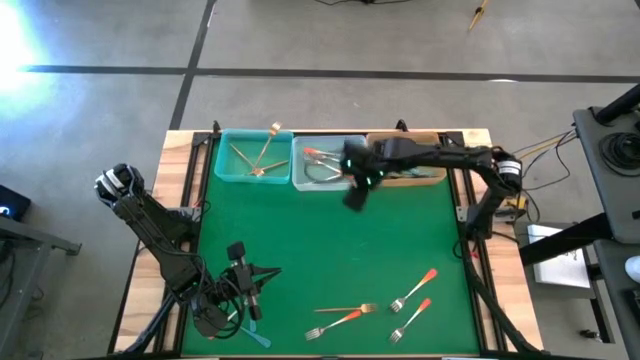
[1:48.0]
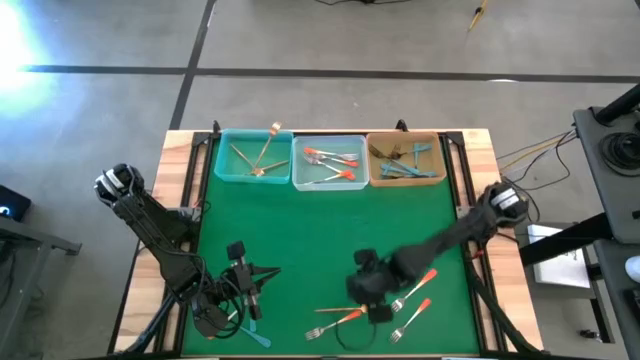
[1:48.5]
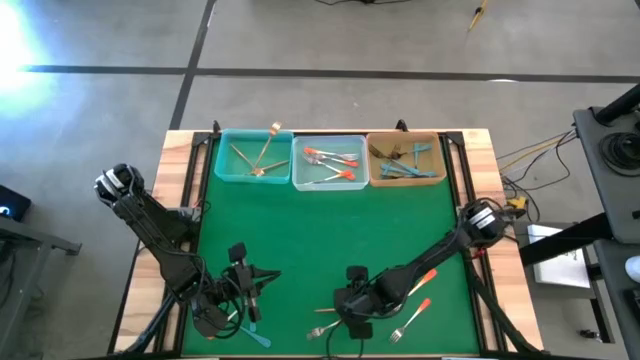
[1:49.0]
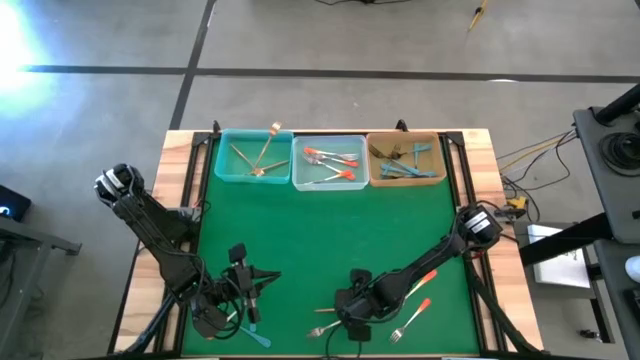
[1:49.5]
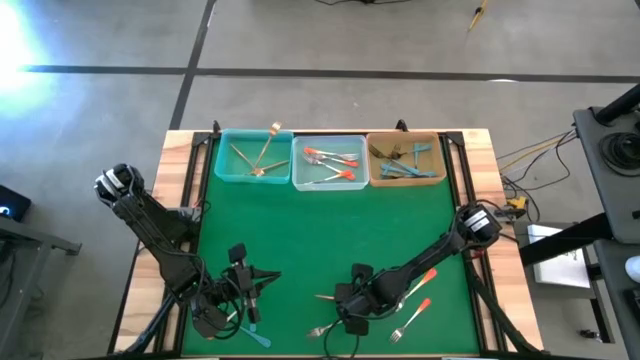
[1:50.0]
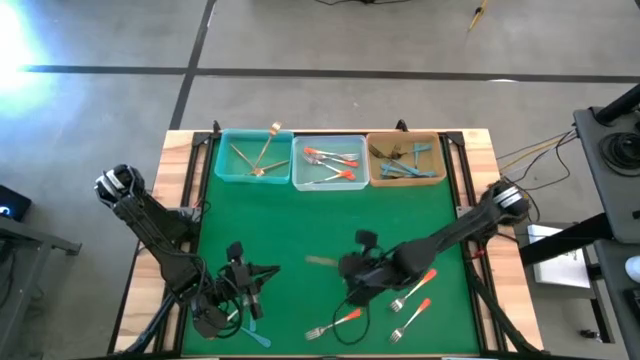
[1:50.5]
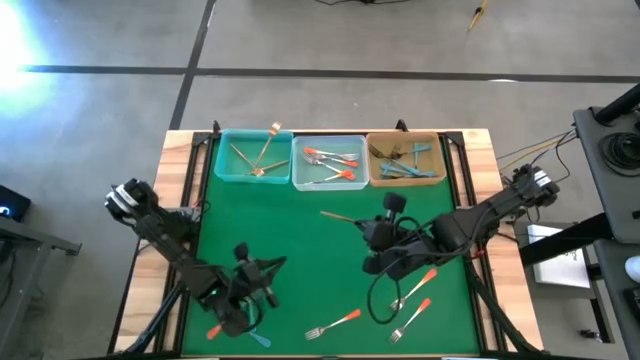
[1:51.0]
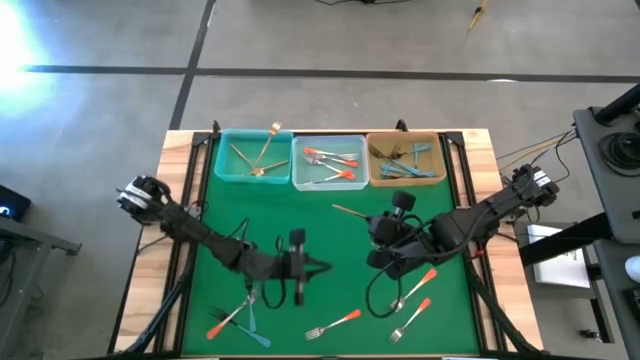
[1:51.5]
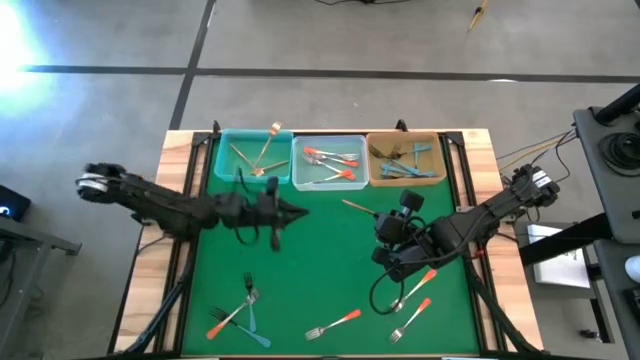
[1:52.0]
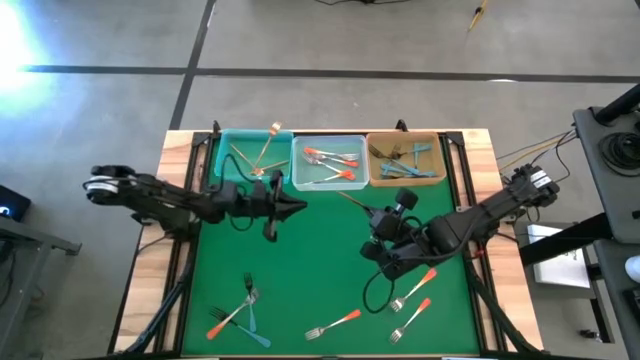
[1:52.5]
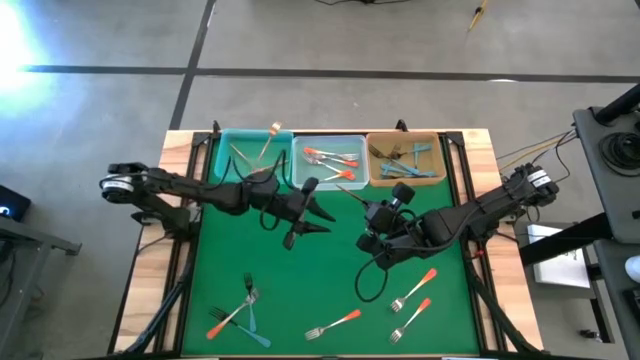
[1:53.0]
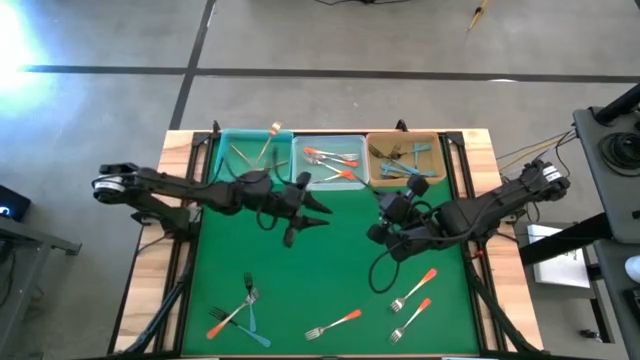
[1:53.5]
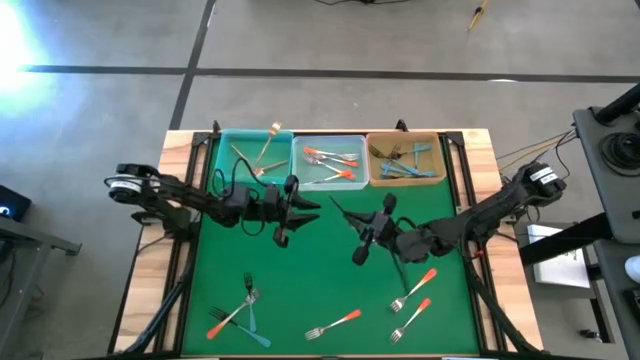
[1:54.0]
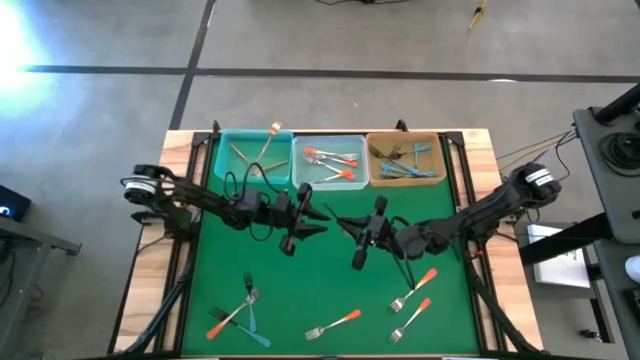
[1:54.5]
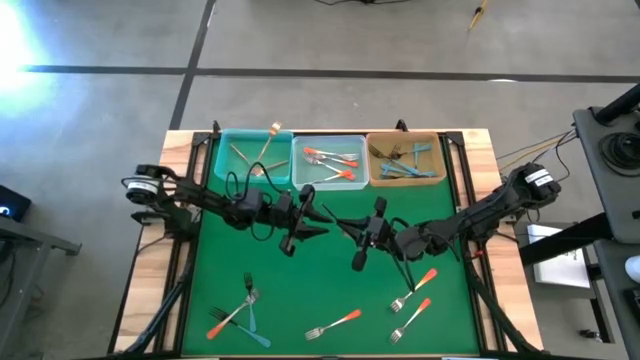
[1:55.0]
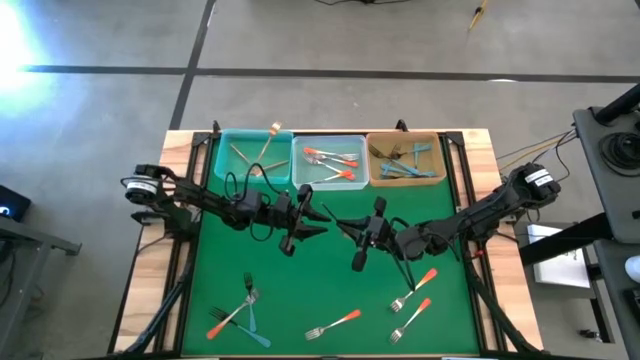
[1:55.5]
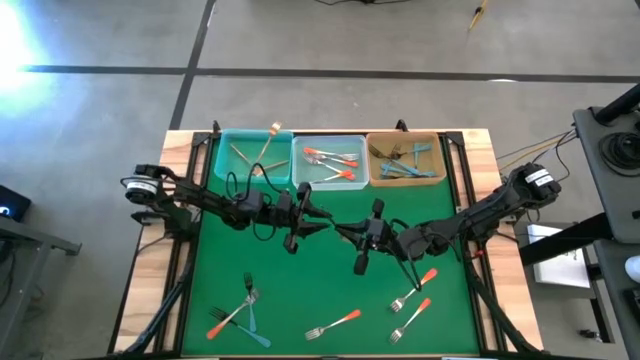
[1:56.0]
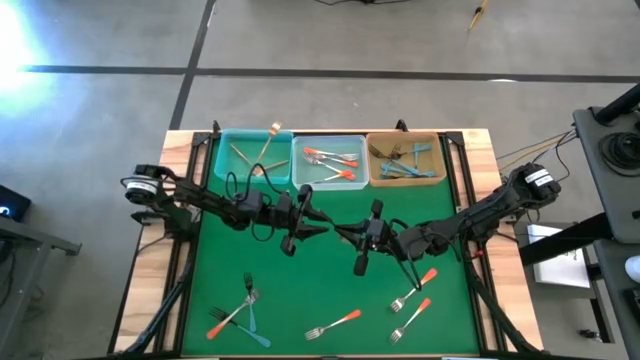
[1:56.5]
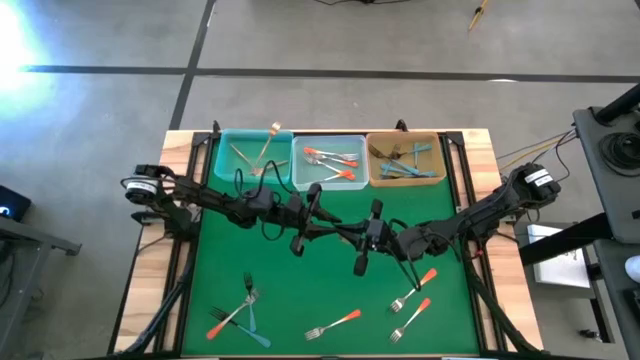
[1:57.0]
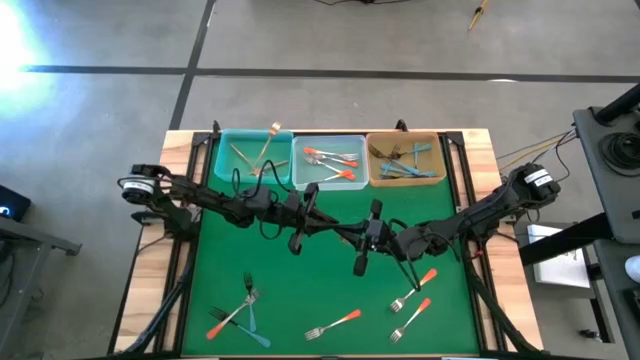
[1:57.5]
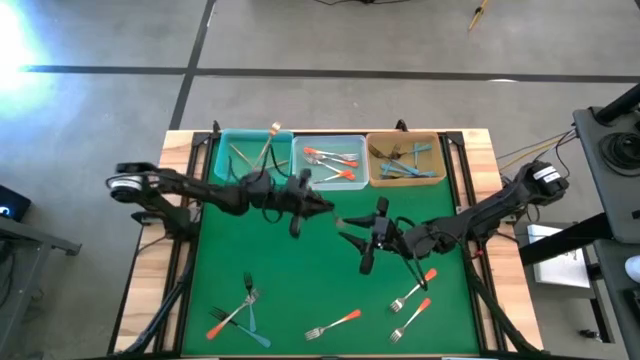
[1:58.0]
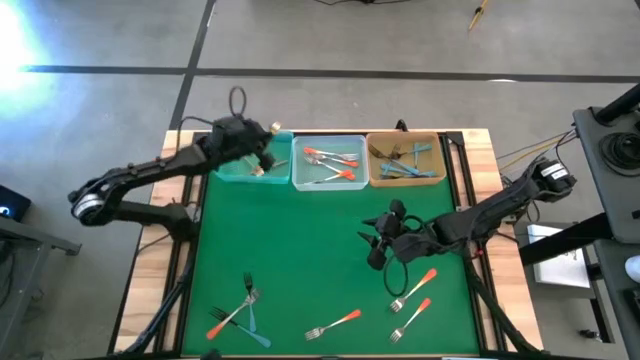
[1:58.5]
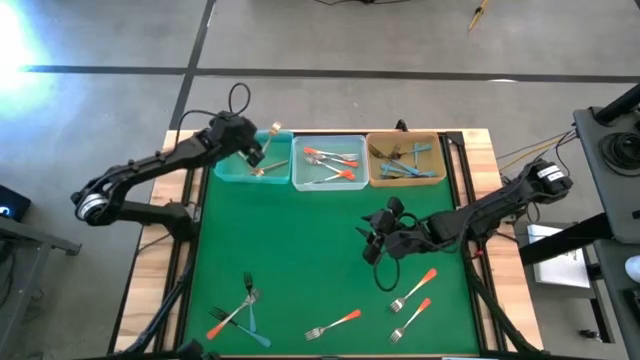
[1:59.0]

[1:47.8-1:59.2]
Task: Sort silverware by color (type)
Put the gold fork into the blue bin

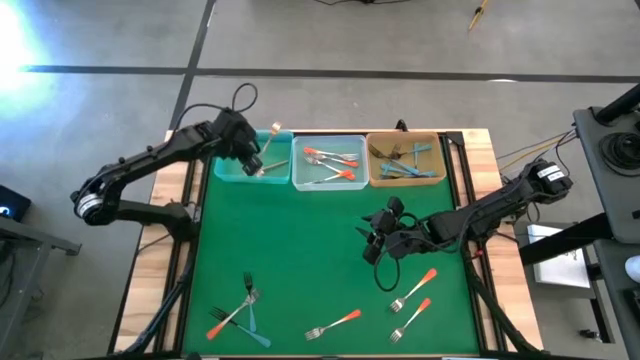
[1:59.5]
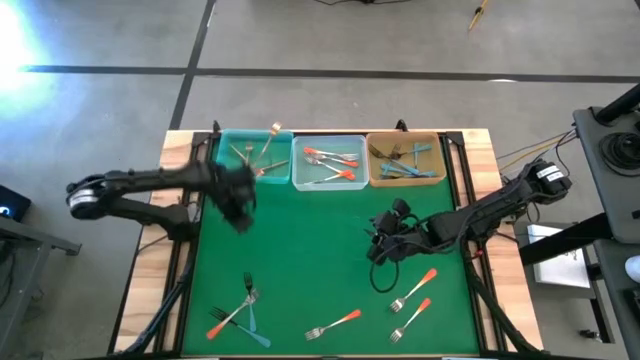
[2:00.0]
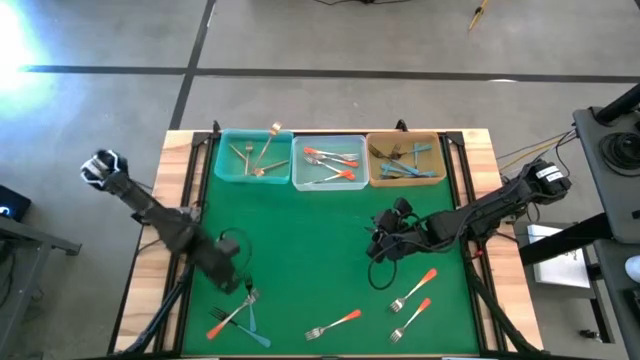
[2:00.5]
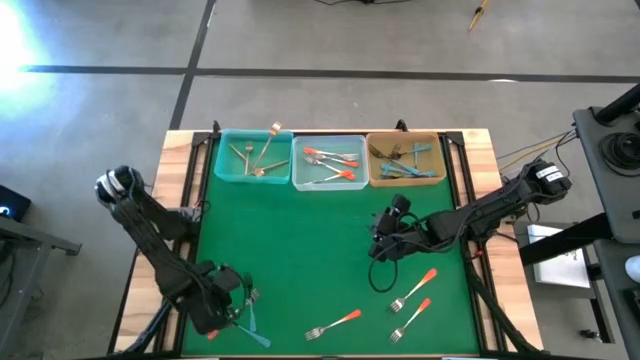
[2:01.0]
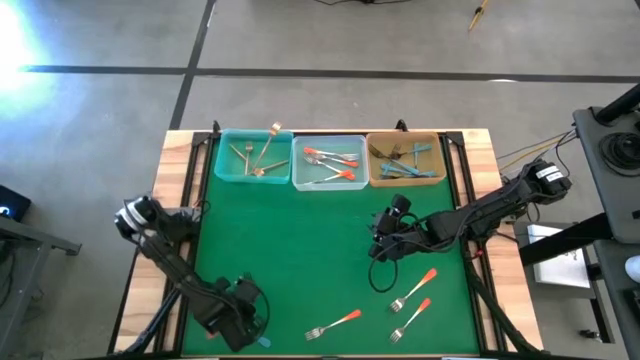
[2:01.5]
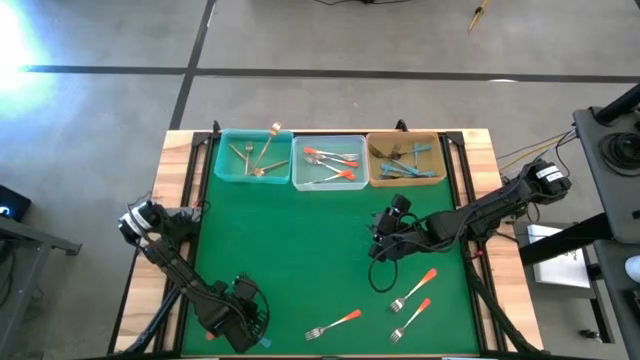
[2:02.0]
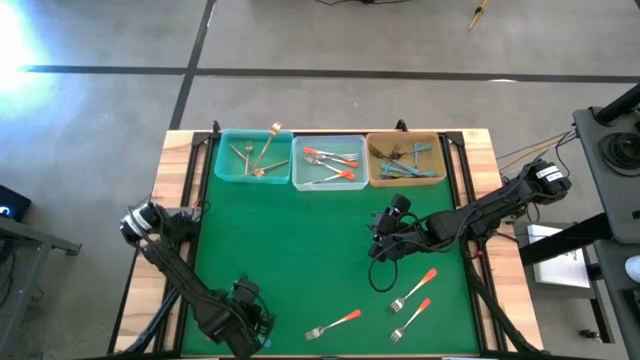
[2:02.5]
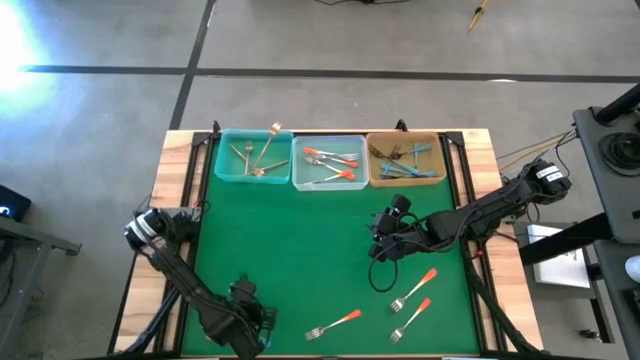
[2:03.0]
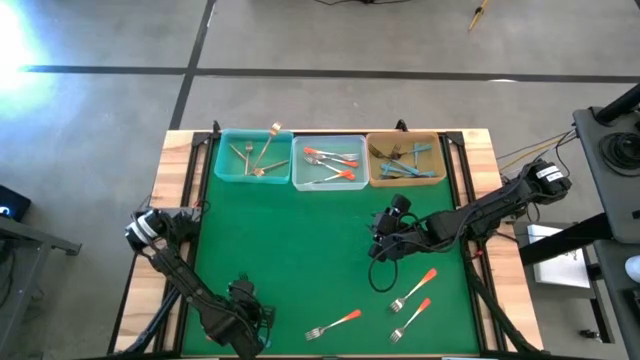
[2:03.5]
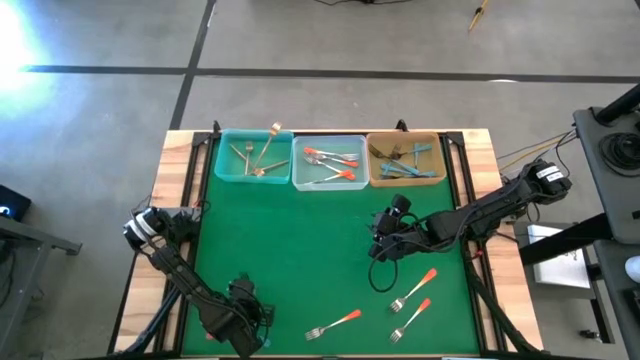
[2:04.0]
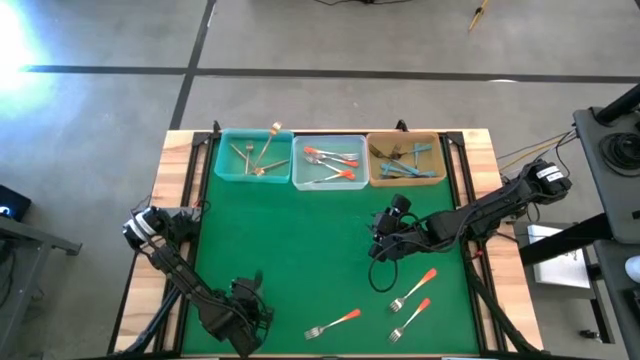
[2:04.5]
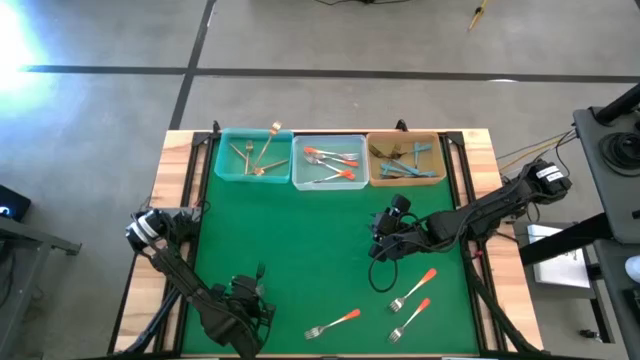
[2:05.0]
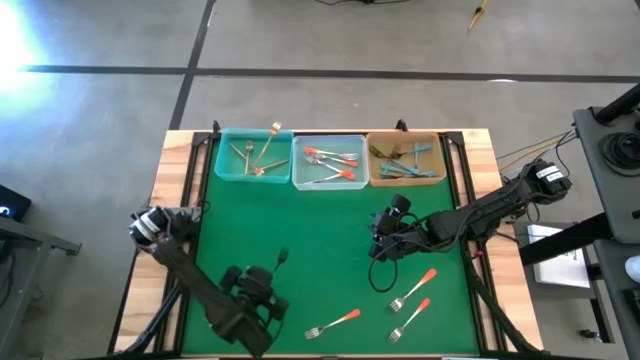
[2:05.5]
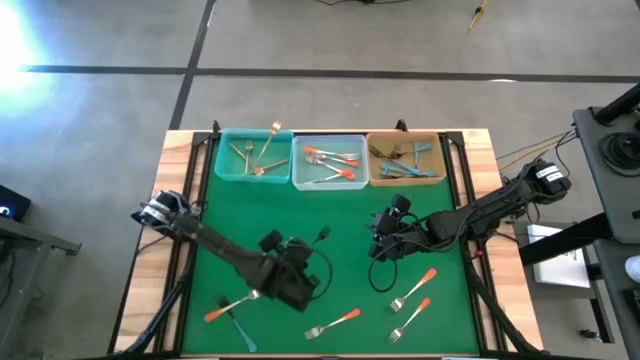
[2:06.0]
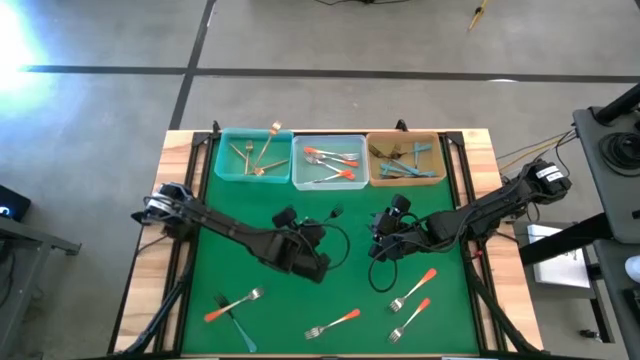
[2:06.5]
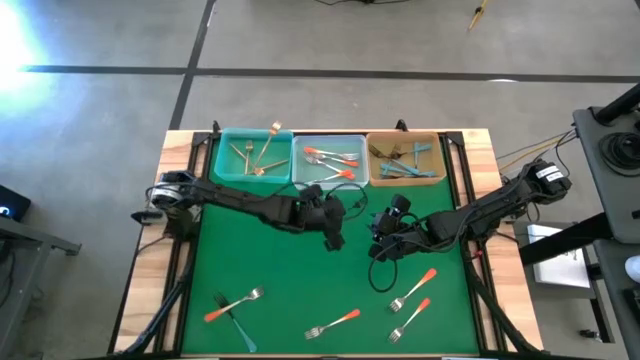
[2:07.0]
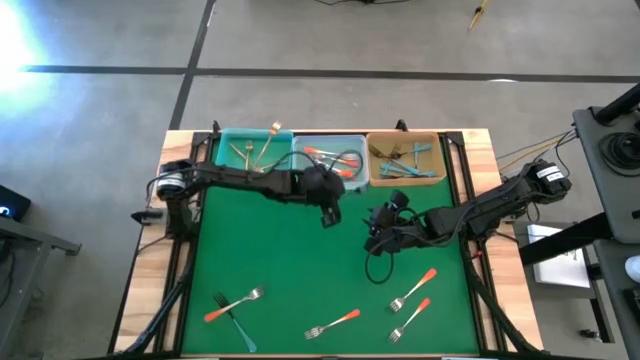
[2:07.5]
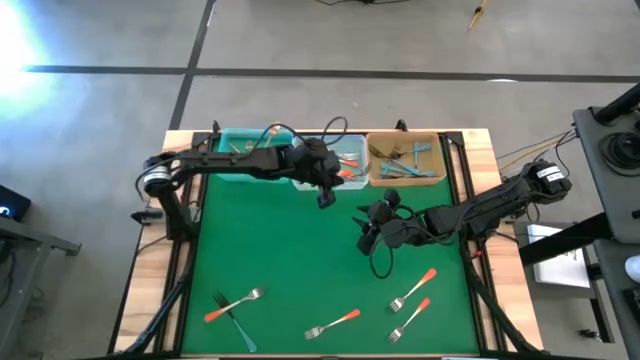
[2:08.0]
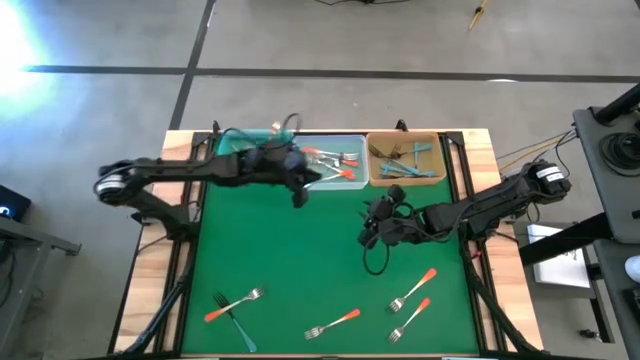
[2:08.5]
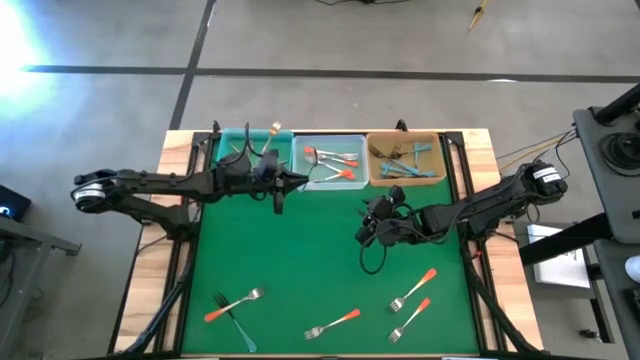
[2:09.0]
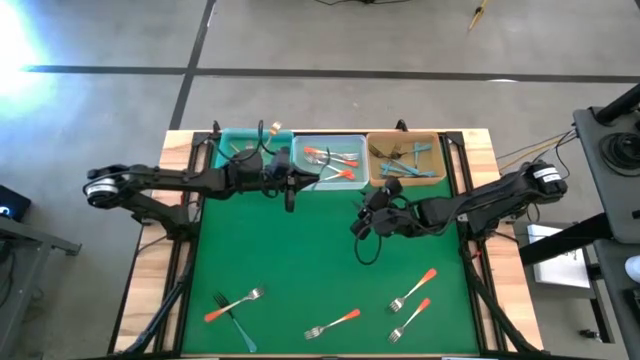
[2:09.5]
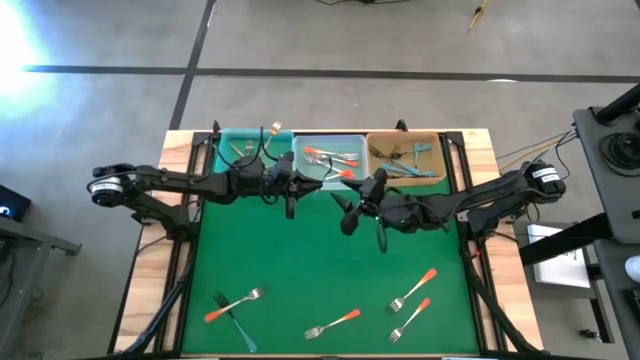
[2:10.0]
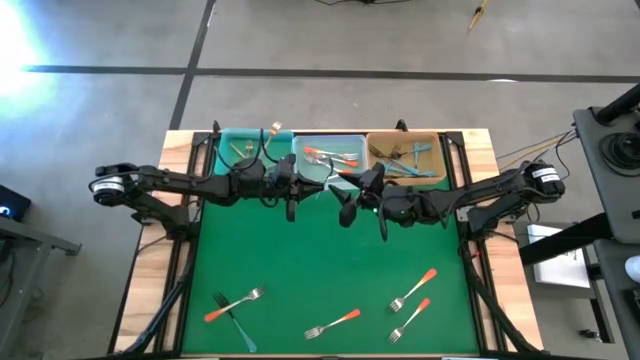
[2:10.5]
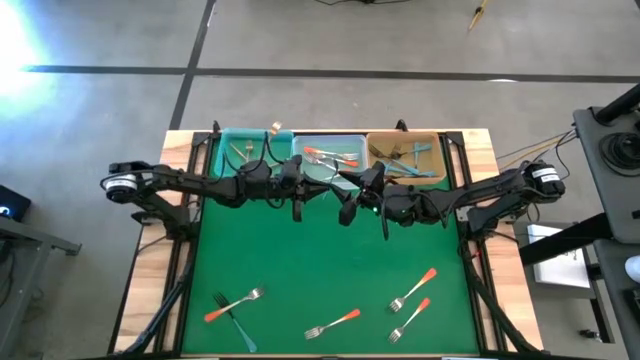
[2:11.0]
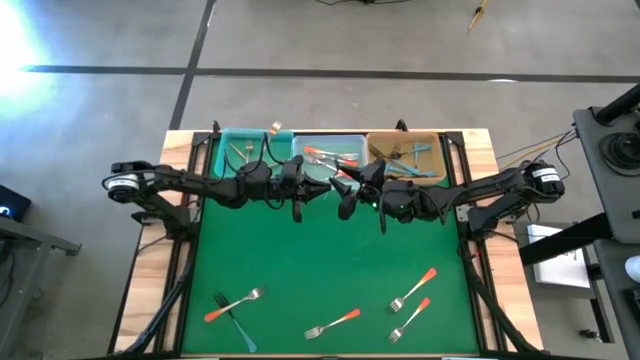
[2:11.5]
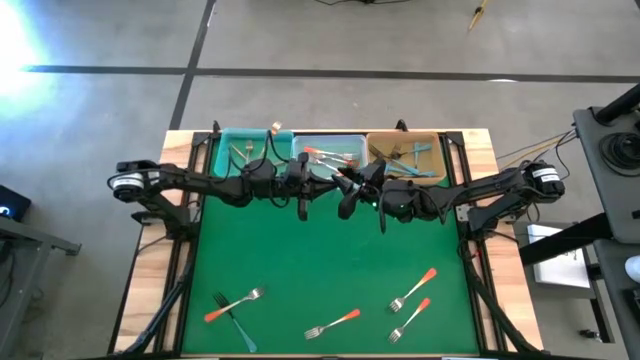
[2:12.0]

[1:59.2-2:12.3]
Put the blue fork into the orange bin
